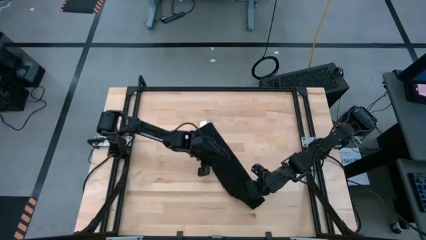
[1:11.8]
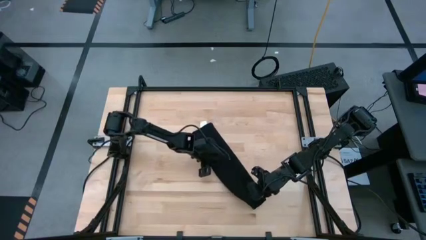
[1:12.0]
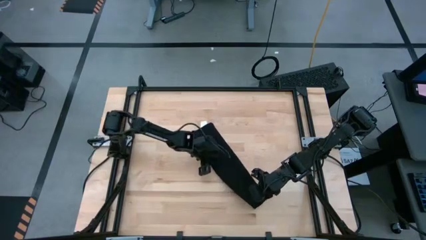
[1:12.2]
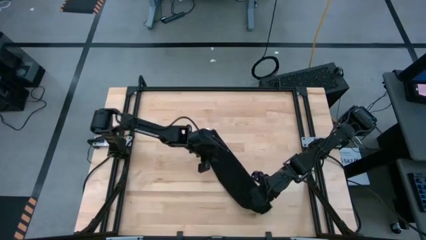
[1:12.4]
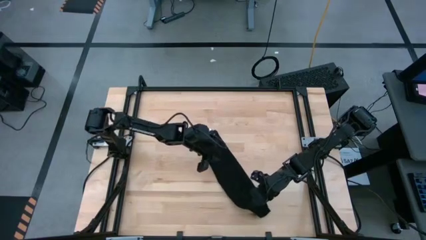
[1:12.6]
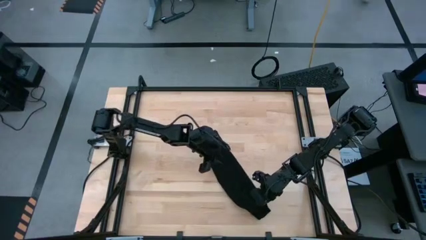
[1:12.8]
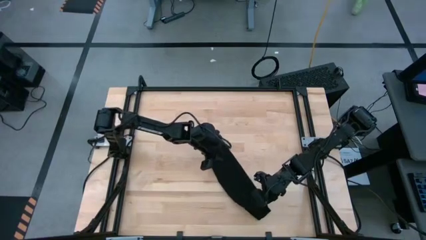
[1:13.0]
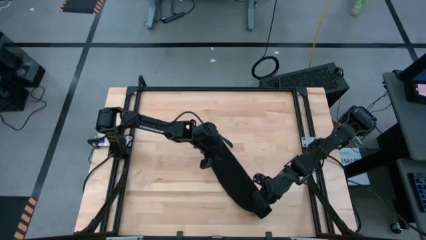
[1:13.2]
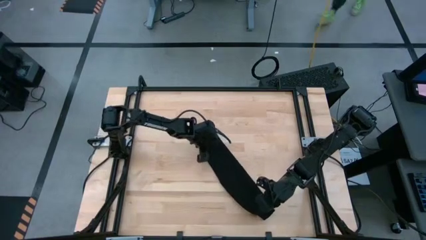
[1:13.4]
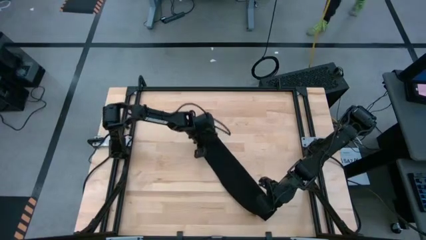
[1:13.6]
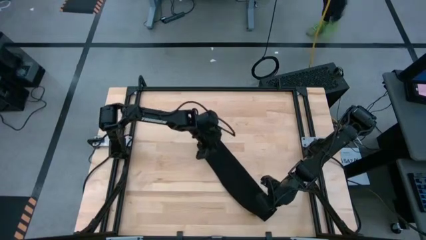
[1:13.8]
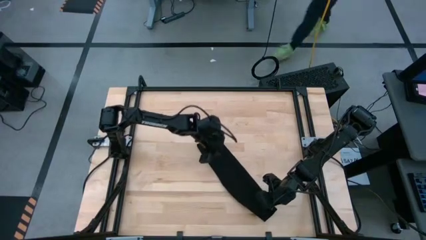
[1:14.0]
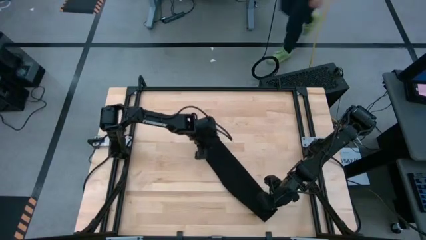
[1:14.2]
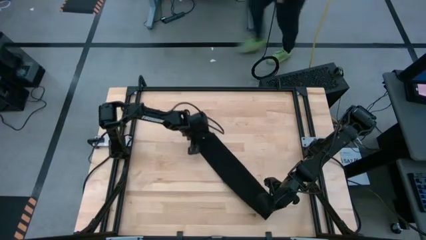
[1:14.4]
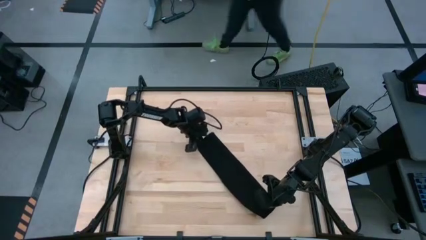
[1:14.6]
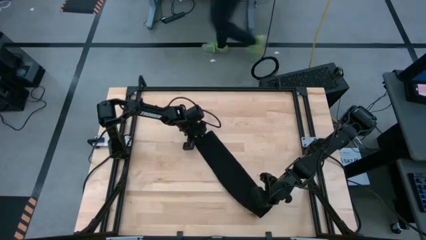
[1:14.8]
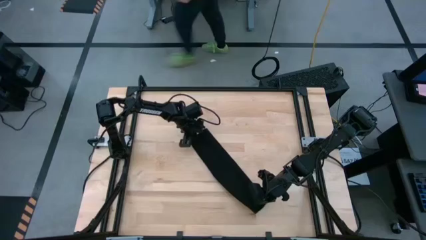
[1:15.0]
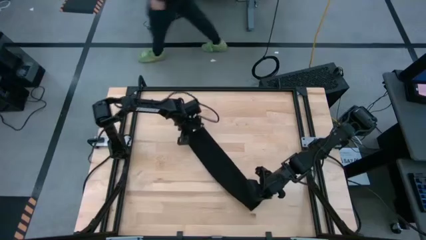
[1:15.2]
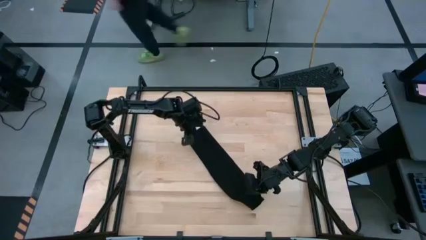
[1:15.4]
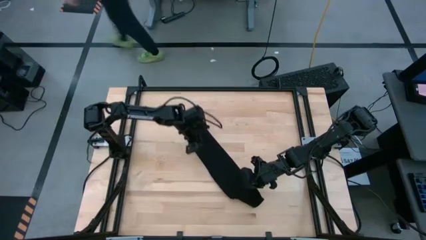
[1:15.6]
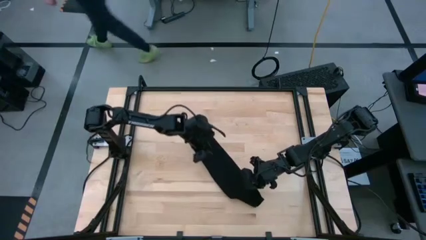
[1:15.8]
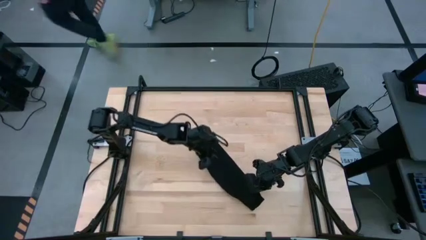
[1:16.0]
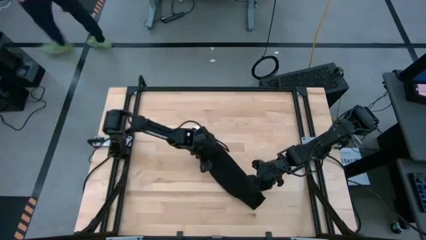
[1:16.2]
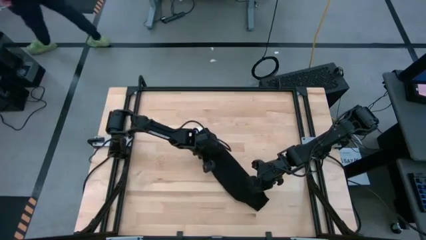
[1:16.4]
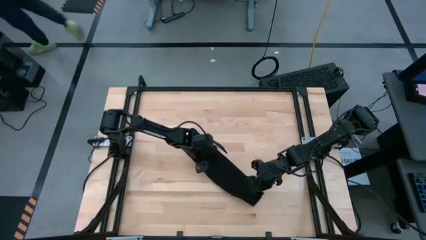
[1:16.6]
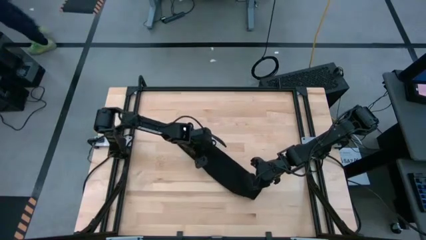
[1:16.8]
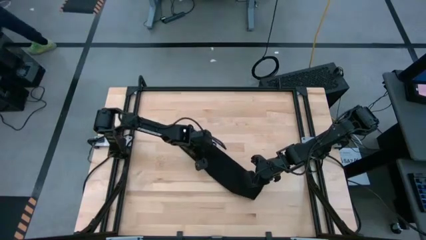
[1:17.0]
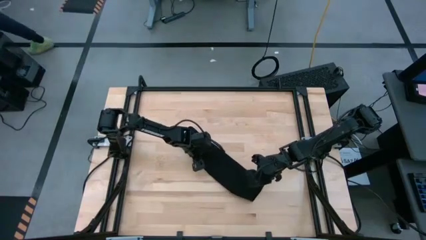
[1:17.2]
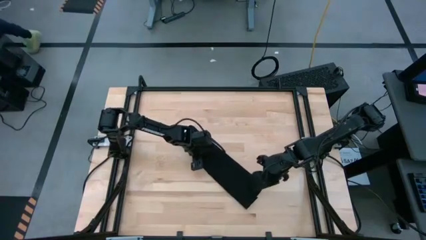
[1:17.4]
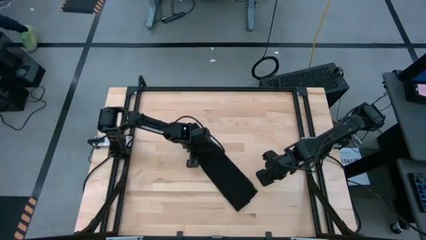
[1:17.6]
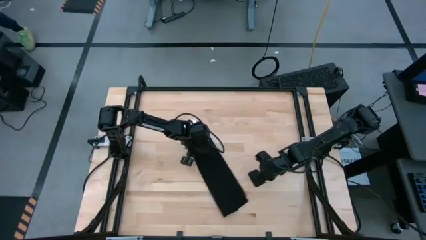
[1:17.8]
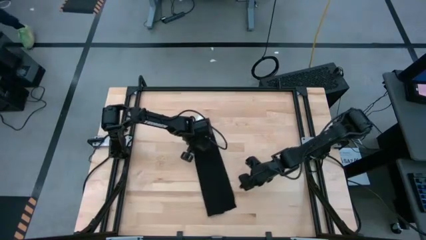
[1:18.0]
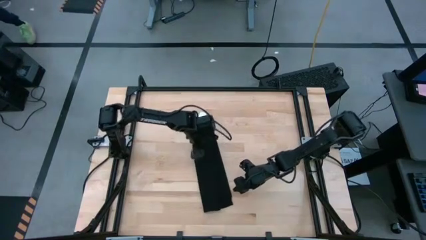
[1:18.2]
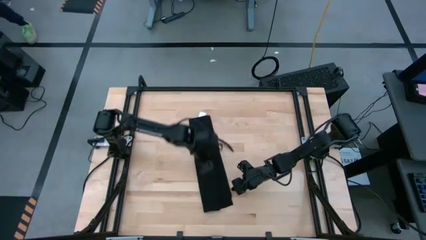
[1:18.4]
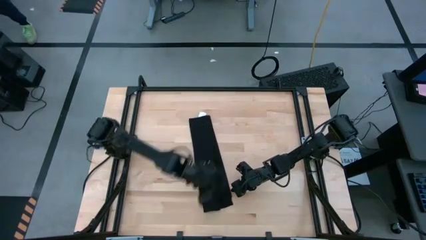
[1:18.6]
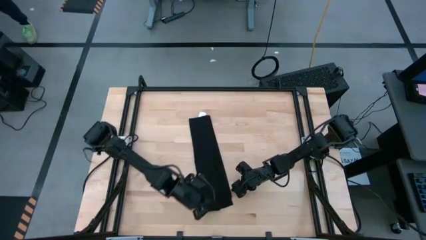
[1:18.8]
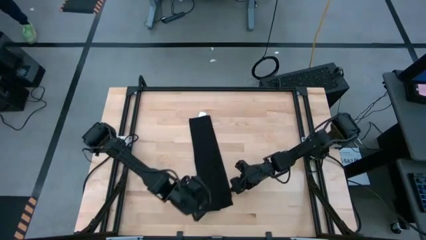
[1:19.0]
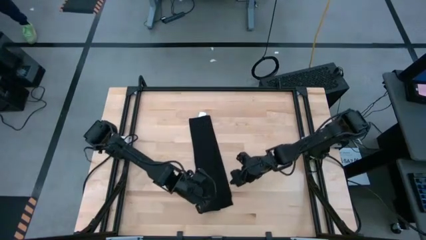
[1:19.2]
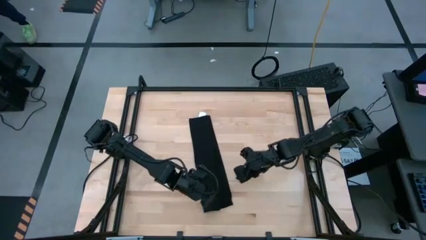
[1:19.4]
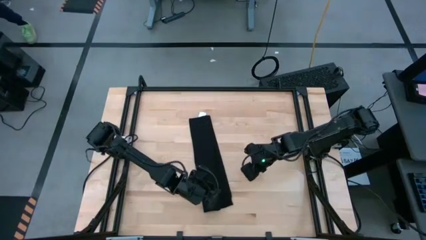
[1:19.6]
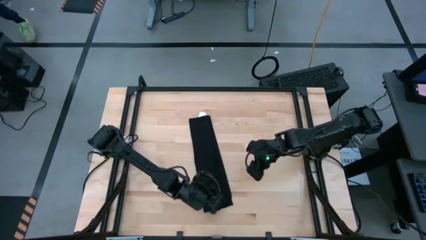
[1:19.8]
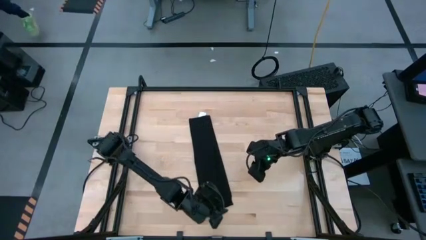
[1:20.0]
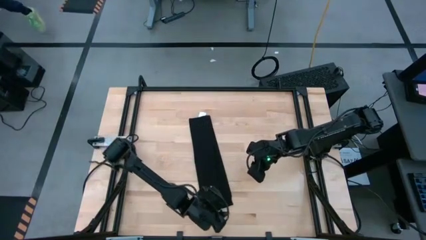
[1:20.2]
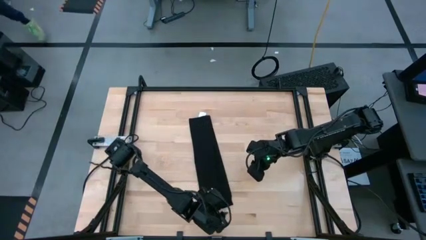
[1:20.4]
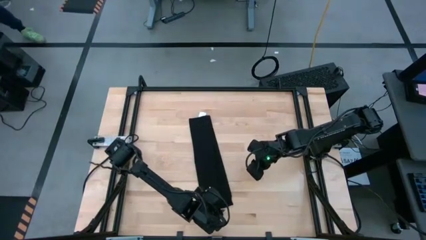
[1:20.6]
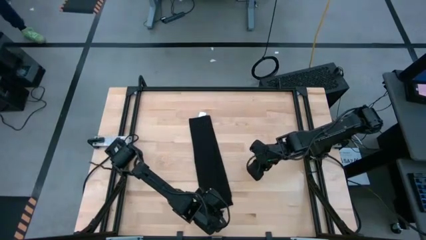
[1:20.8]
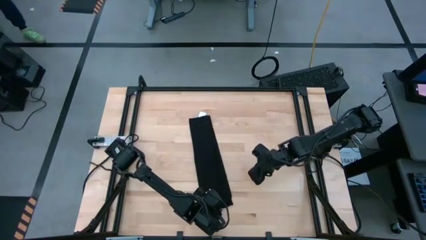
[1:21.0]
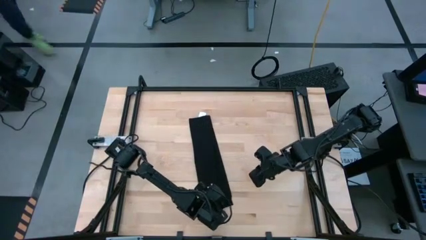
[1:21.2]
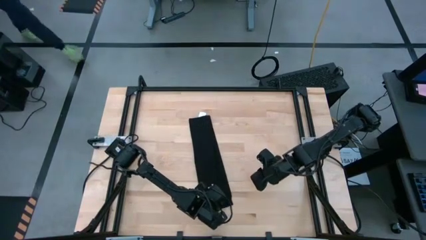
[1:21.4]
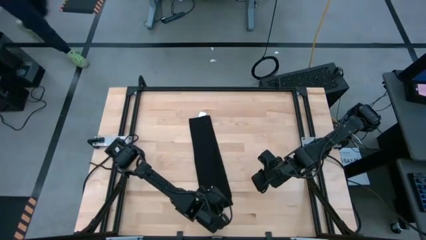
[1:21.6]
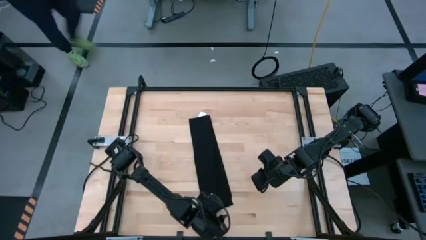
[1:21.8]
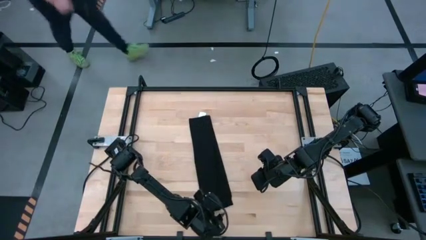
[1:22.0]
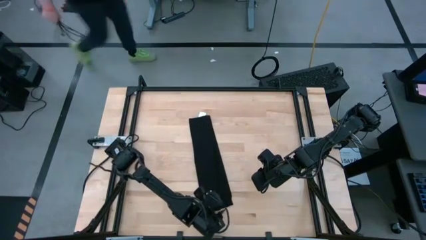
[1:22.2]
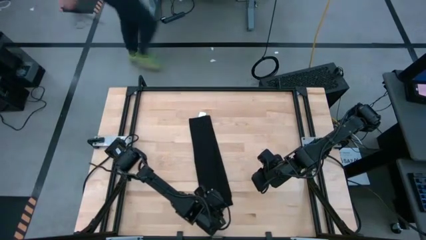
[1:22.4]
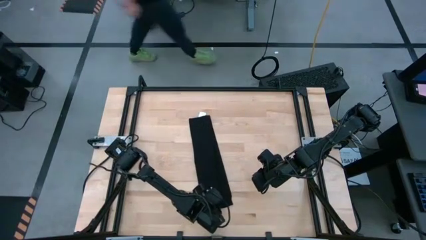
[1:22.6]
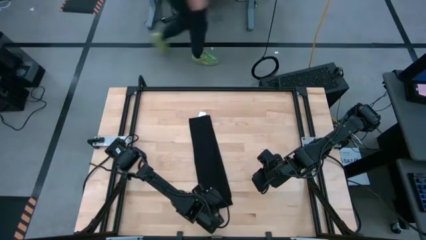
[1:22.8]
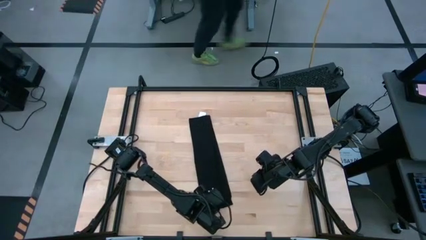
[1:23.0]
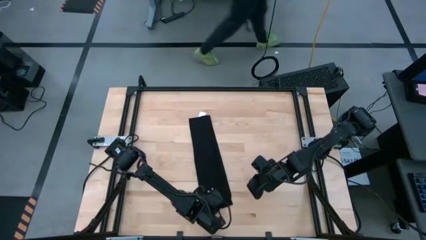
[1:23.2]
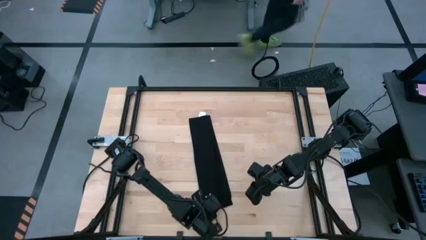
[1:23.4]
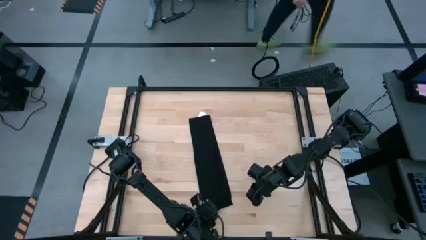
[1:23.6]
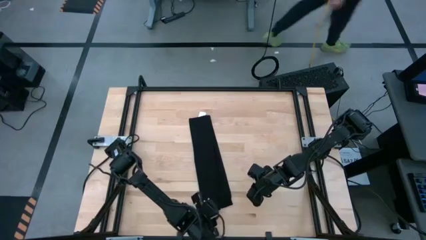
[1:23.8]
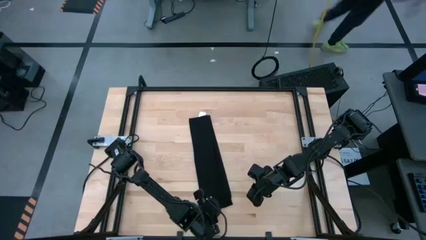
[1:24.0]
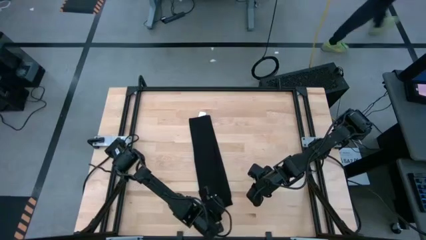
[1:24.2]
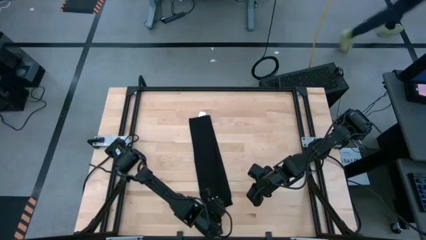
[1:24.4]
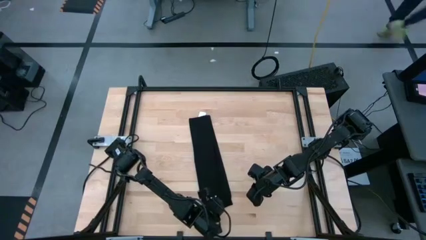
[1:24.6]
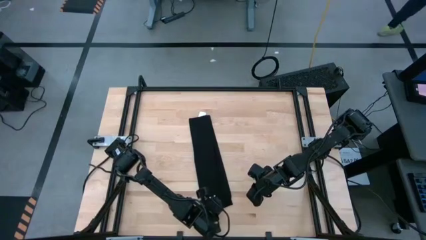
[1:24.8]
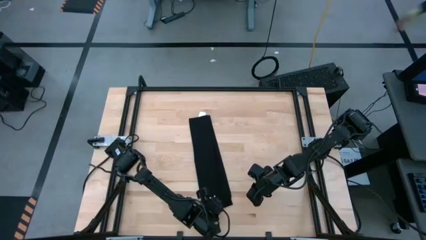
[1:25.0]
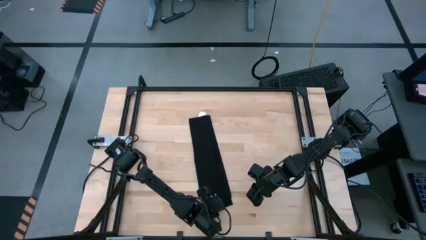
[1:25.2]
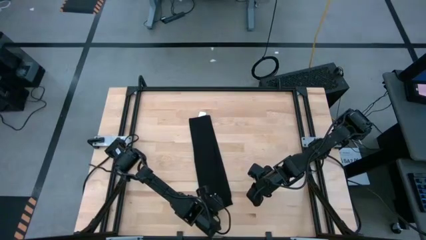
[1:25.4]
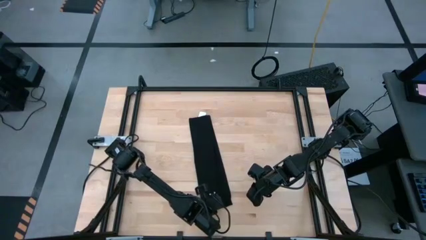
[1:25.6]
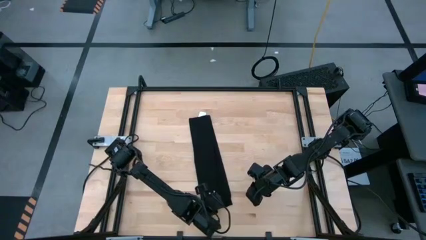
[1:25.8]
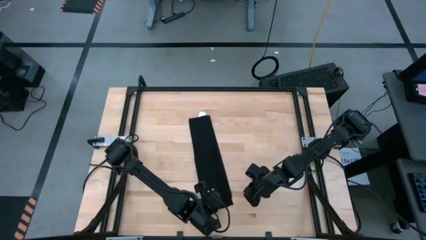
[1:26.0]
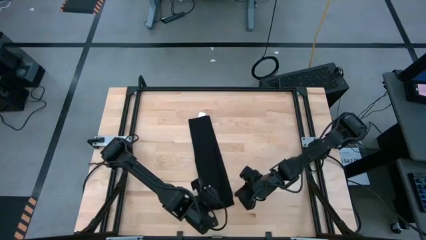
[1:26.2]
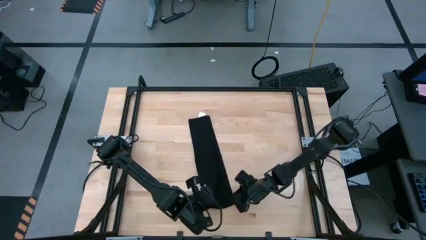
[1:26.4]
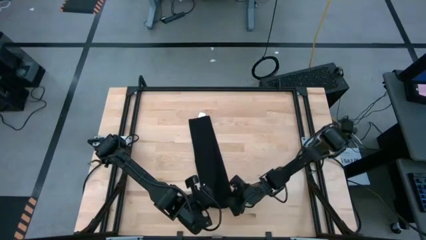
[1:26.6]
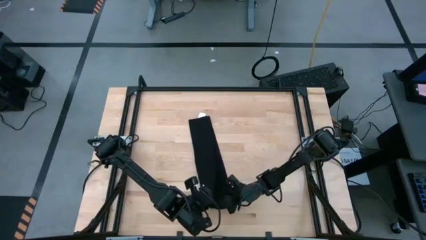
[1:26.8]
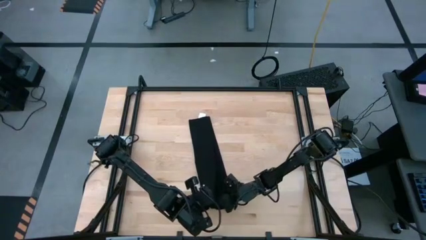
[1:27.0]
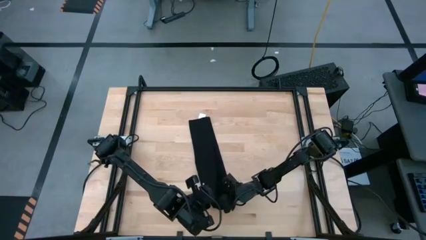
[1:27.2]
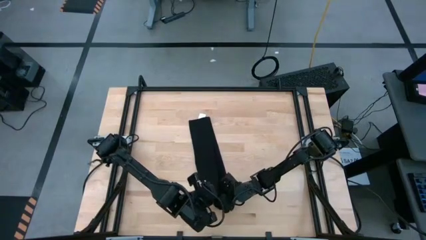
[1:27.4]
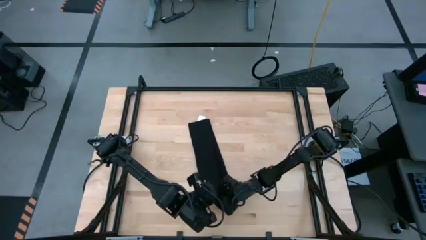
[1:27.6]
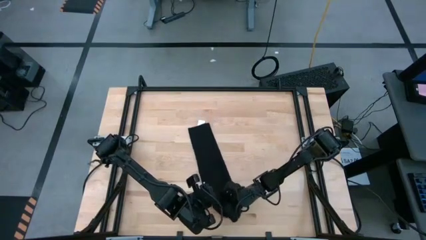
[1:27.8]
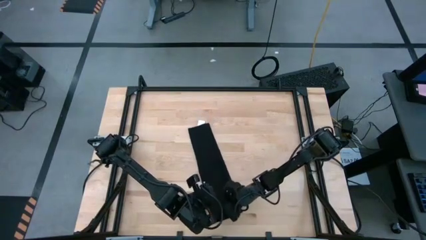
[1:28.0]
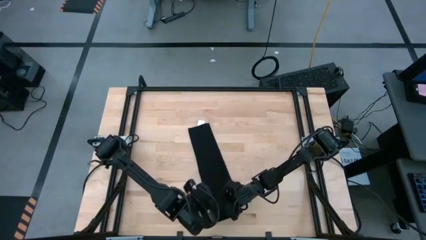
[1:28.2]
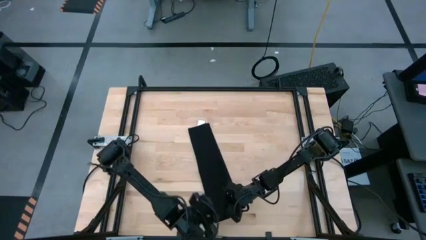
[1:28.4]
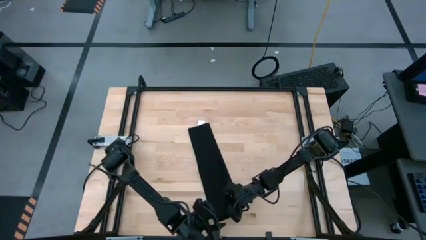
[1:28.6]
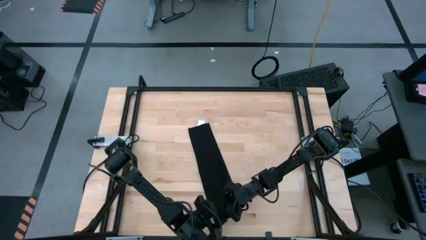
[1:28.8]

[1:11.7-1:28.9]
Task: Roll napkin
Fold the black napkin
